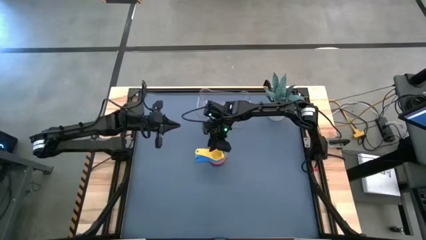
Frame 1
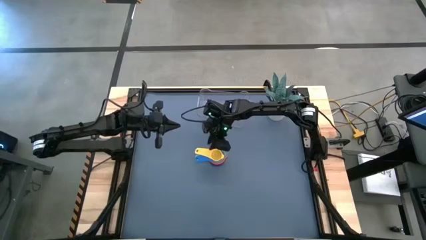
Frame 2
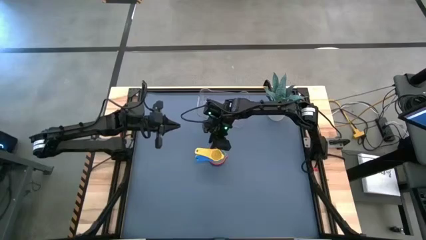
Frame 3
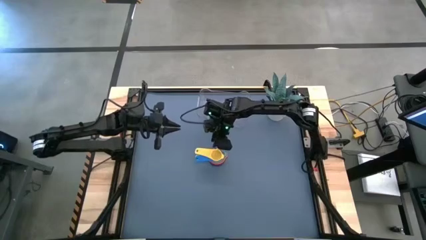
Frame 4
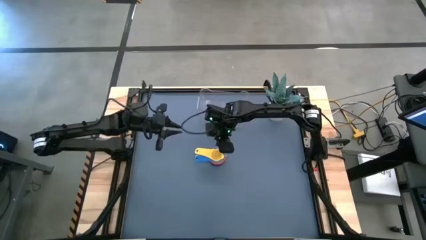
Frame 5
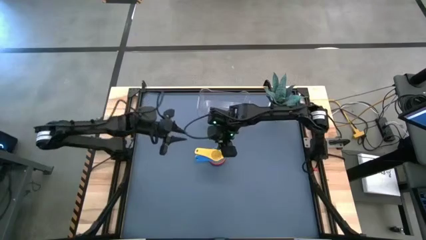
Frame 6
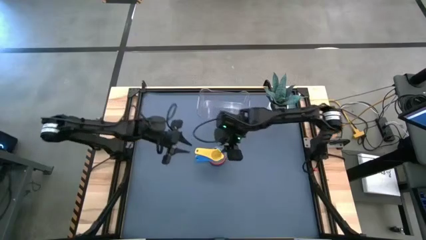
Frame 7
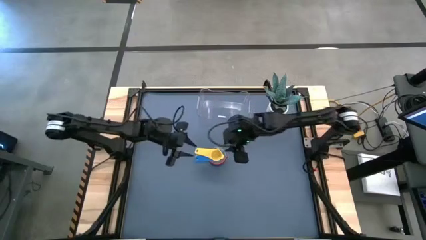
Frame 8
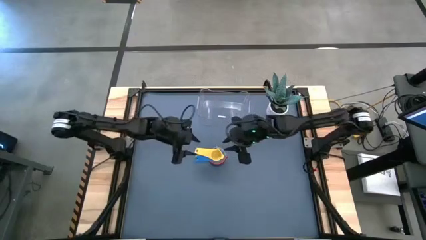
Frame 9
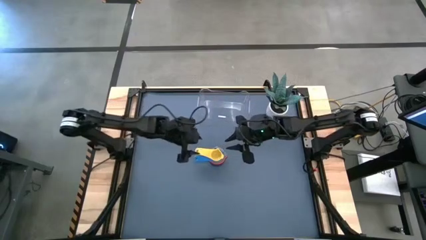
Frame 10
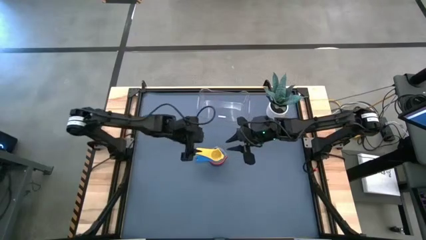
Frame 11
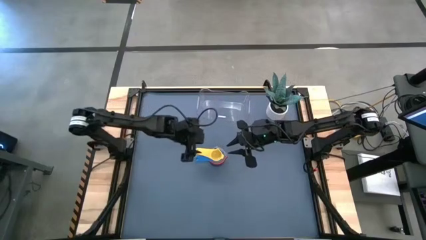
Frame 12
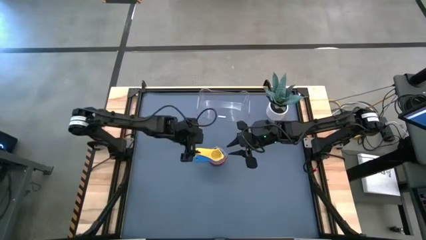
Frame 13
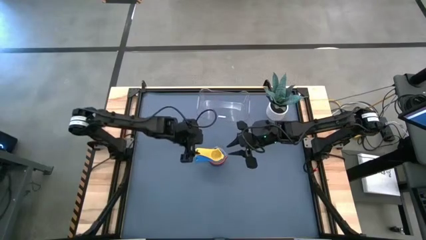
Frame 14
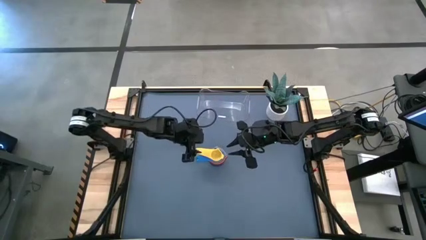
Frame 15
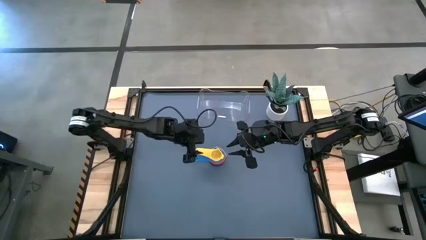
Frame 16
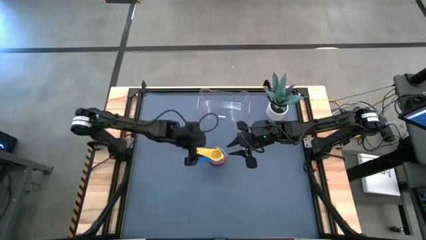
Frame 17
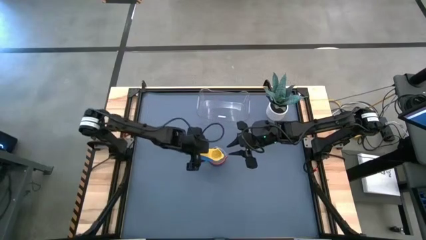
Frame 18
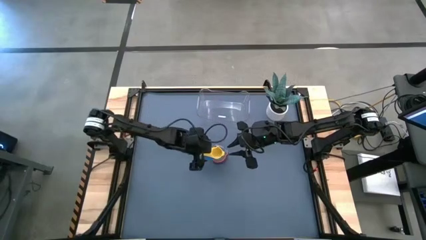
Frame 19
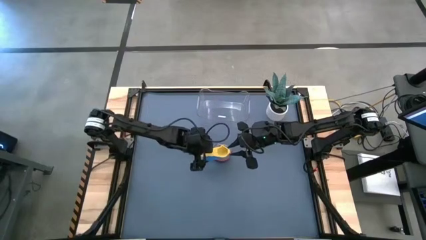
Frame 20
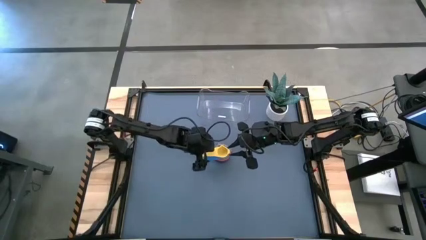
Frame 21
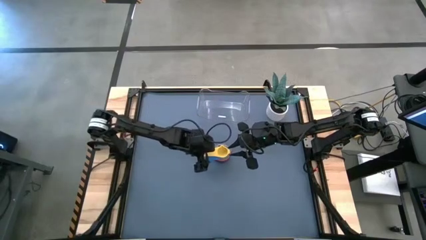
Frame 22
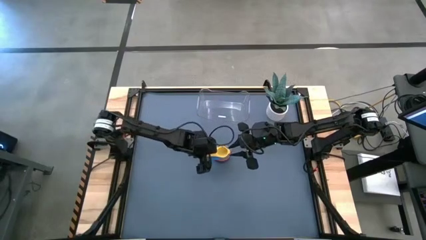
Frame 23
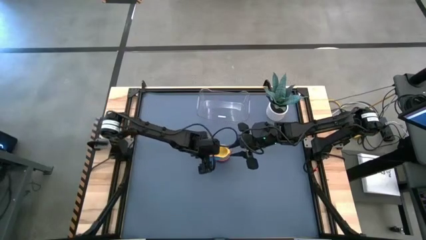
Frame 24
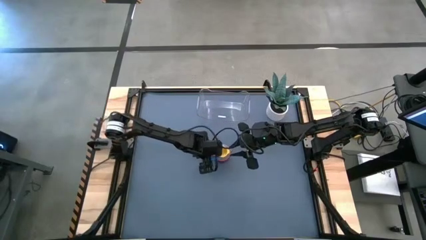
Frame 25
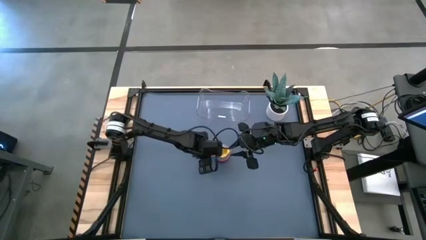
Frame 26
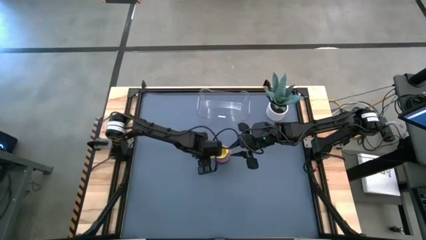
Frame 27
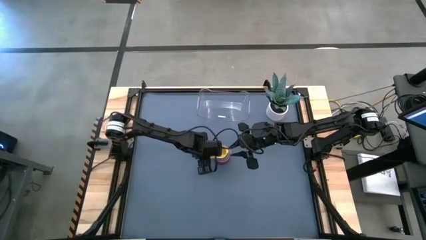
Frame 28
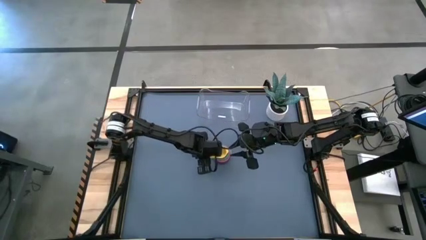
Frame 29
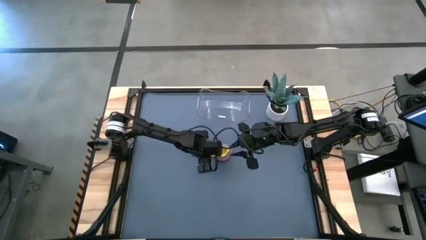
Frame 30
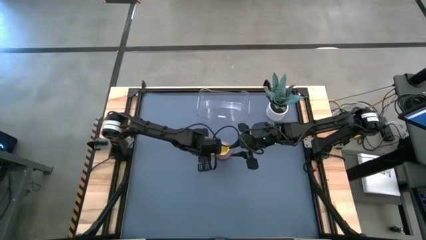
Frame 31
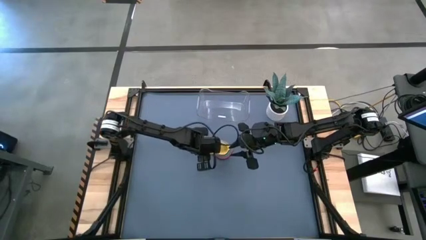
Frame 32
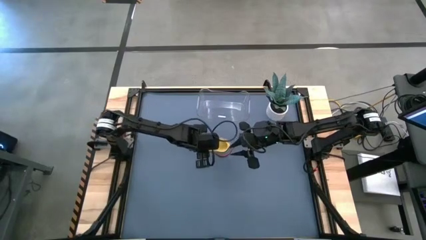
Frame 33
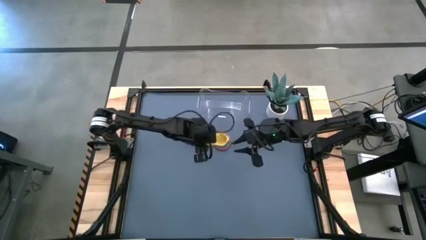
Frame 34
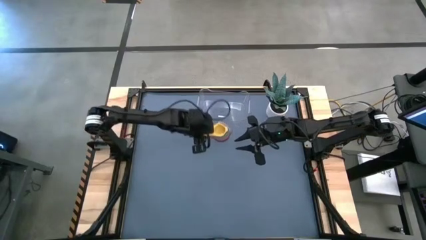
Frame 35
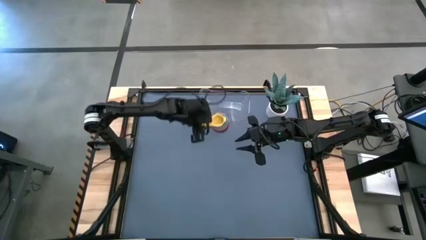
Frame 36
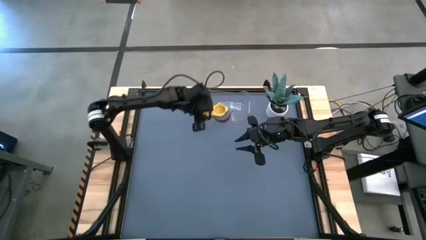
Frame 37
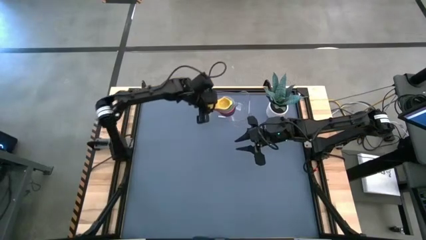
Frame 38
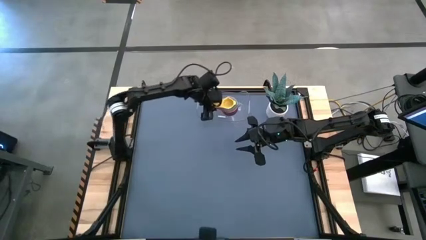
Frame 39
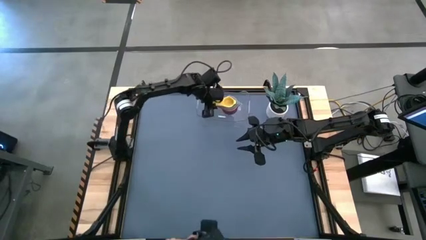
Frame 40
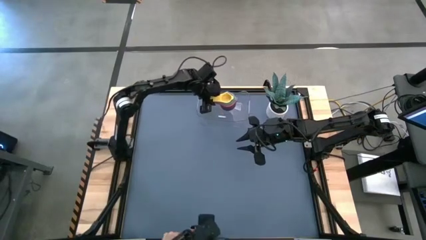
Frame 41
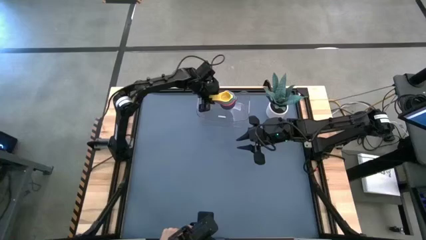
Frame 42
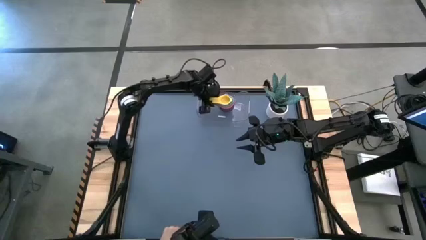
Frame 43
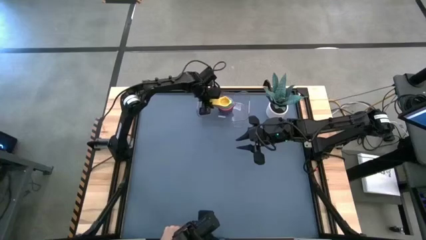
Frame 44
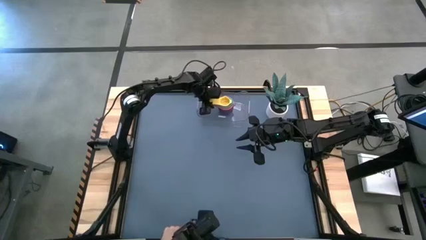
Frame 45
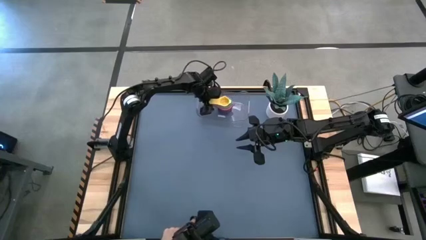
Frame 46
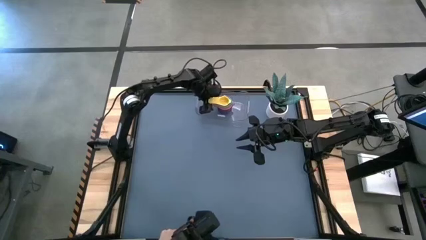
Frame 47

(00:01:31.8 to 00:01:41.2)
Task: Nest measuring cups in basket
Put the nested measuring cups into the transparent bin

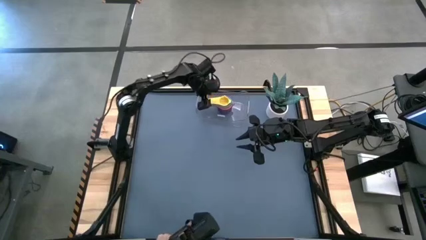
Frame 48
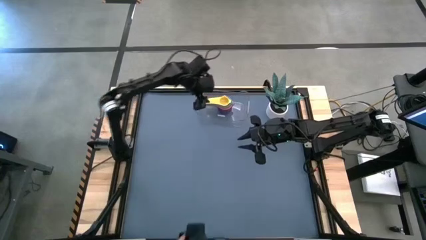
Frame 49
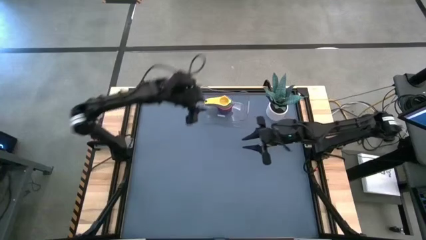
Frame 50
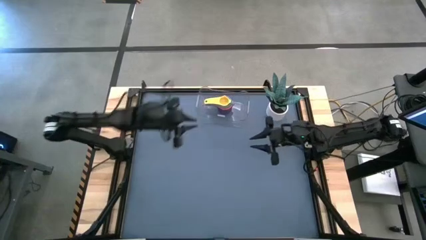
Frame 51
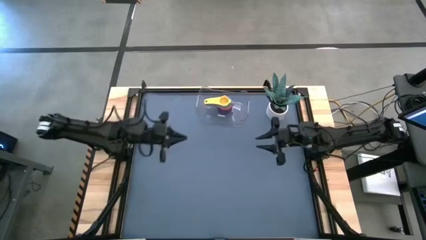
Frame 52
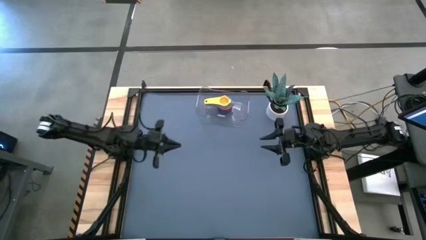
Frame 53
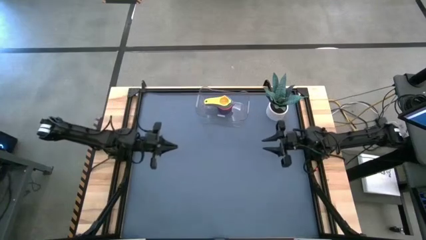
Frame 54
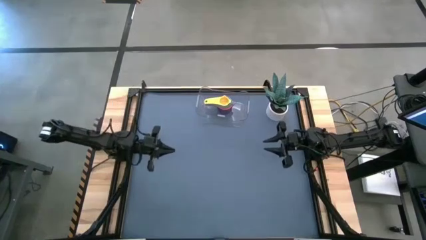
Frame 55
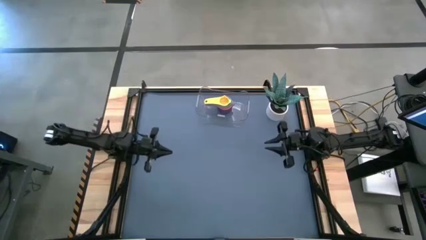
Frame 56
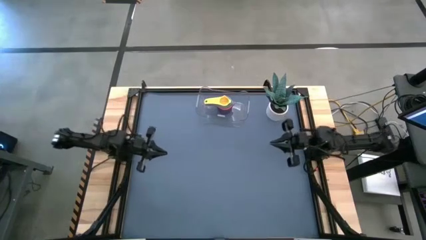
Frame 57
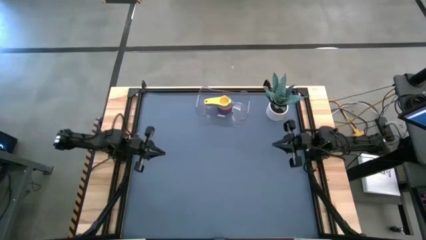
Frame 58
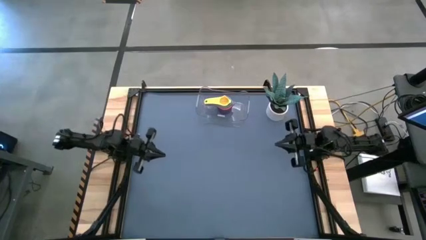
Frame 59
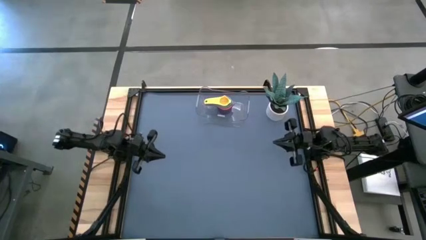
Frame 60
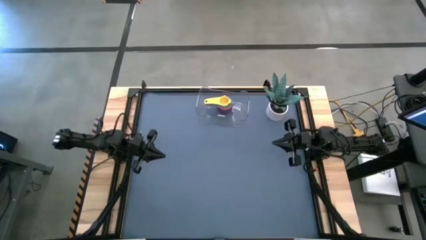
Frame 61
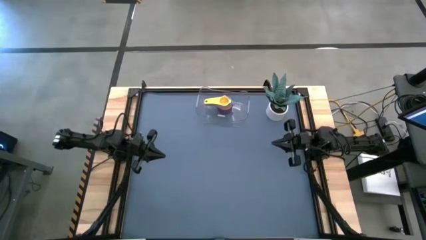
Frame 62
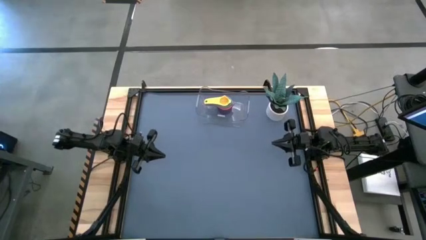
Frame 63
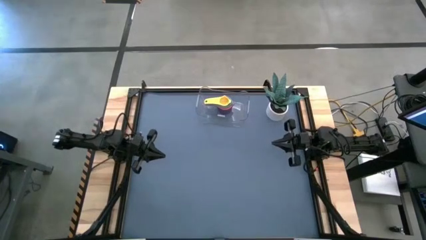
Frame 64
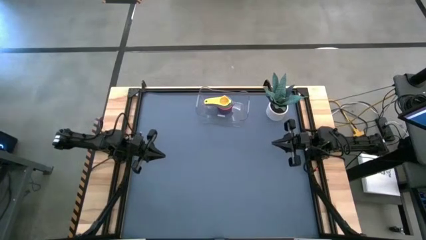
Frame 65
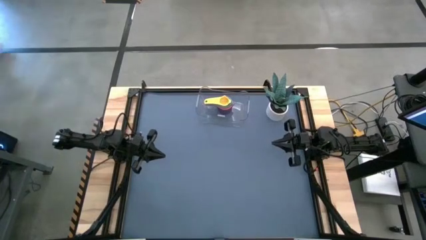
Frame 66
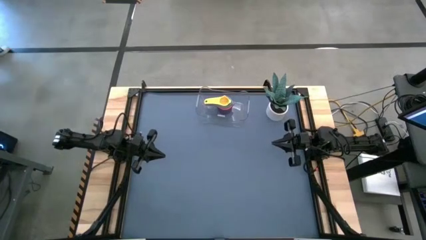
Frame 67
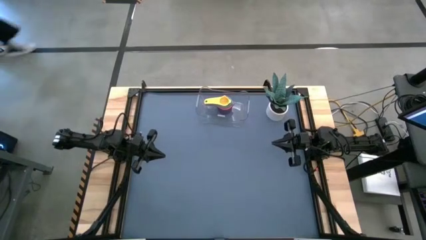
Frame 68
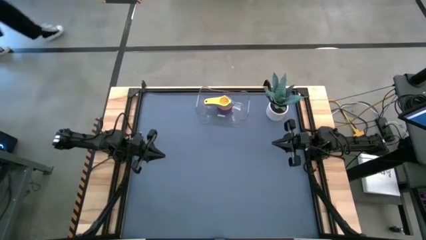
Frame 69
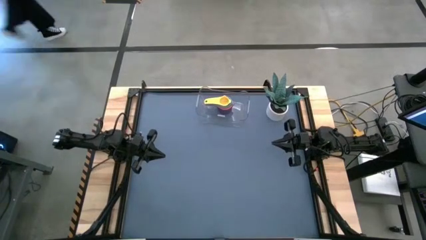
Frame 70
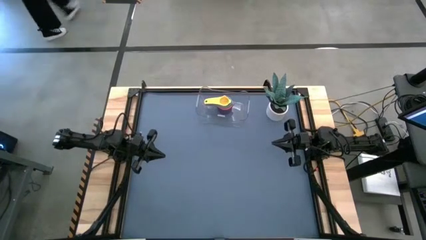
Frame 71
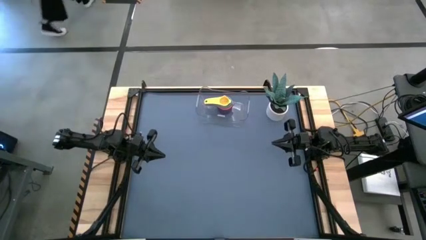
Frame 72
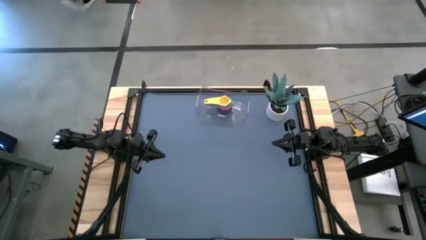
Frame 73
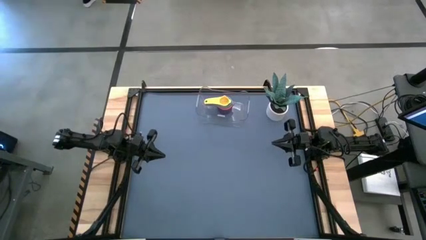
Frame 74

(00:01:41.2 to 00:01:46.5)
Return to Home Position
